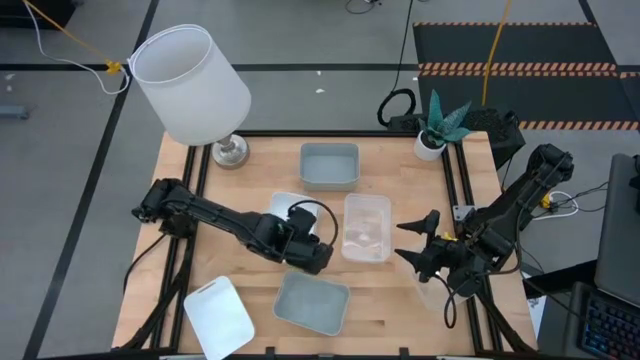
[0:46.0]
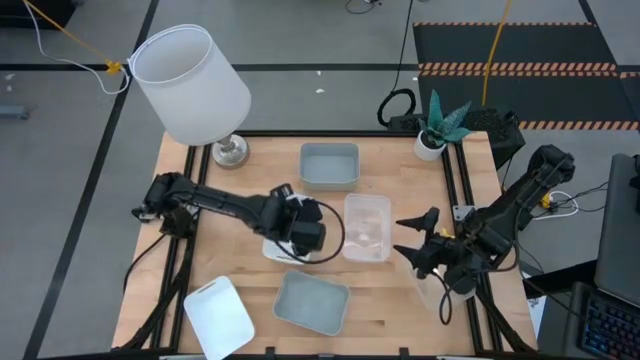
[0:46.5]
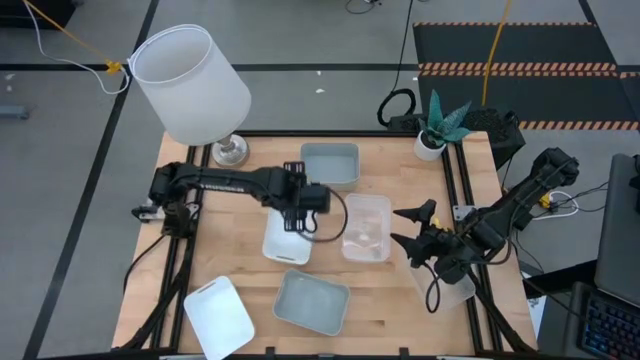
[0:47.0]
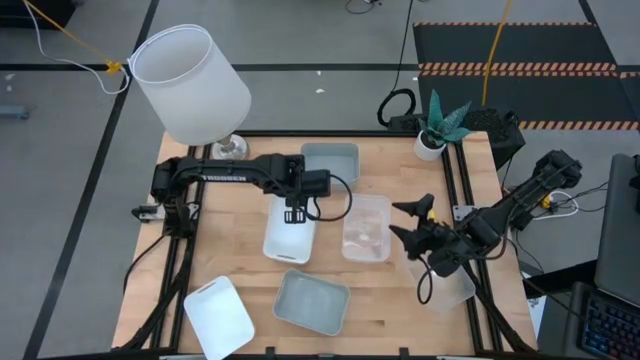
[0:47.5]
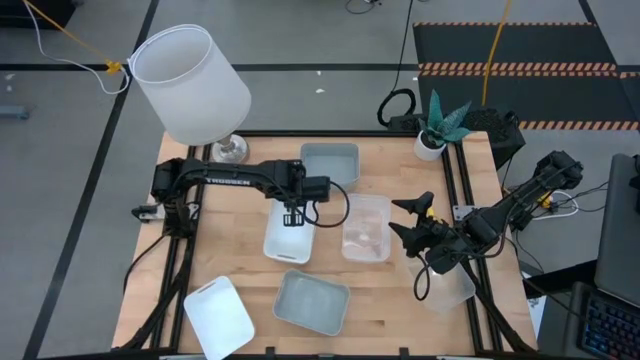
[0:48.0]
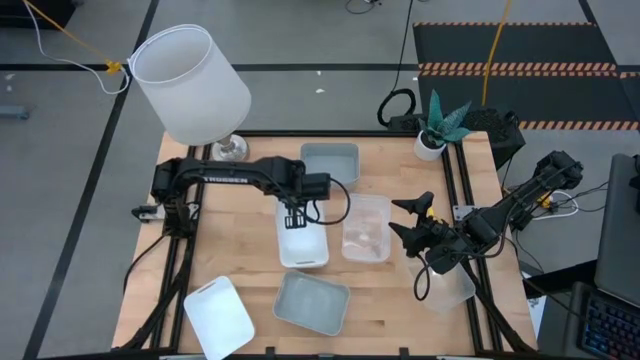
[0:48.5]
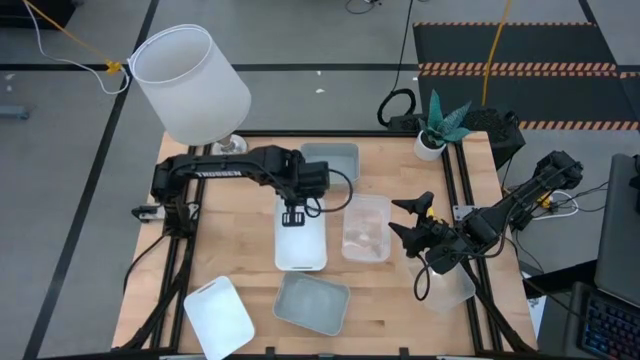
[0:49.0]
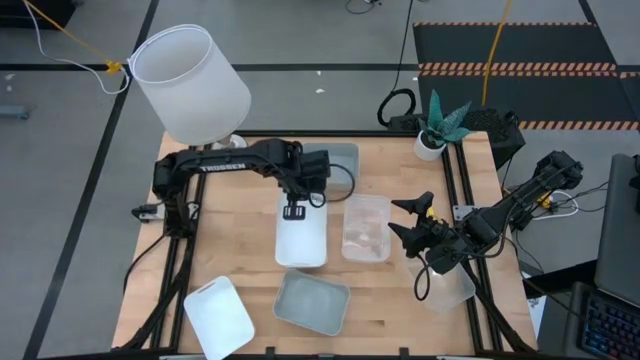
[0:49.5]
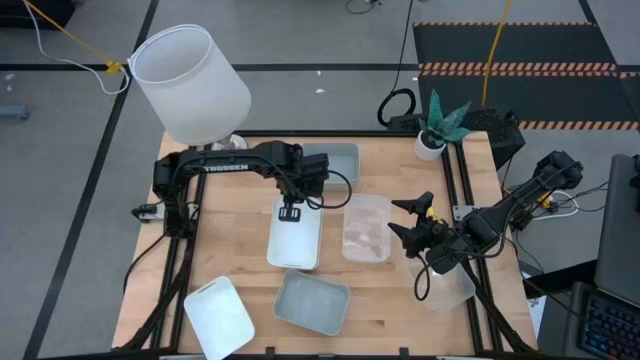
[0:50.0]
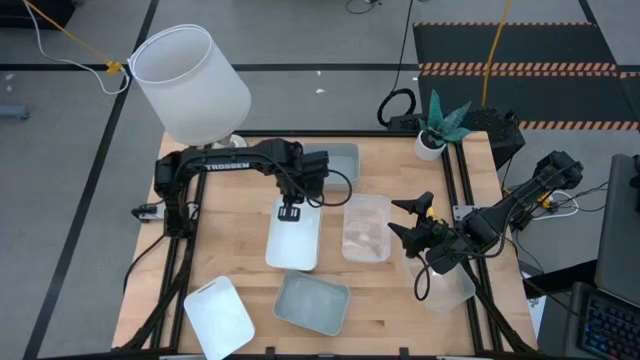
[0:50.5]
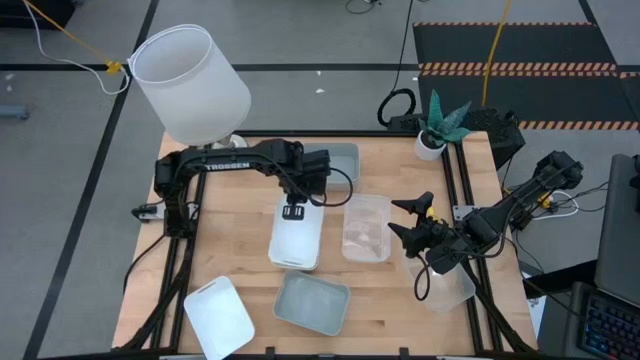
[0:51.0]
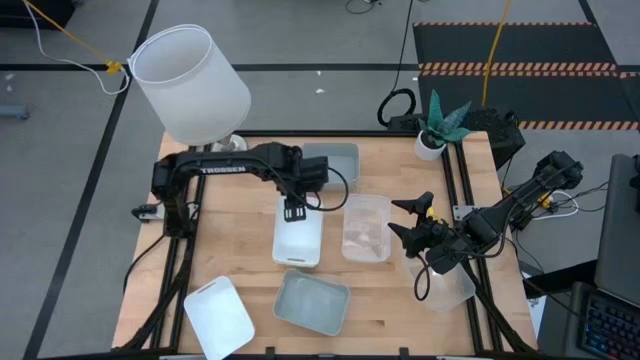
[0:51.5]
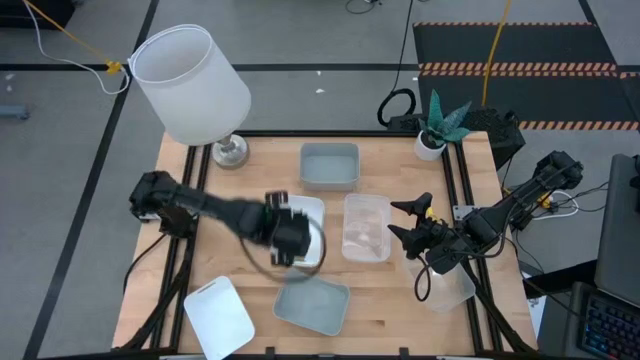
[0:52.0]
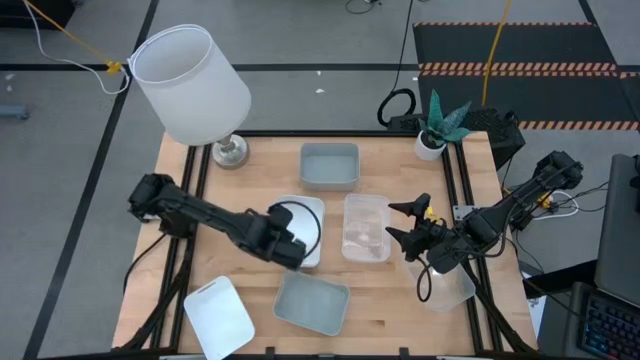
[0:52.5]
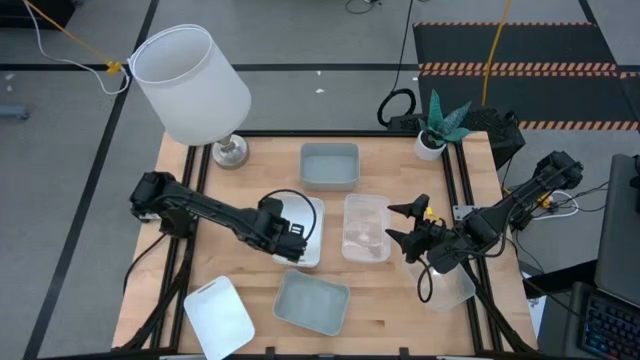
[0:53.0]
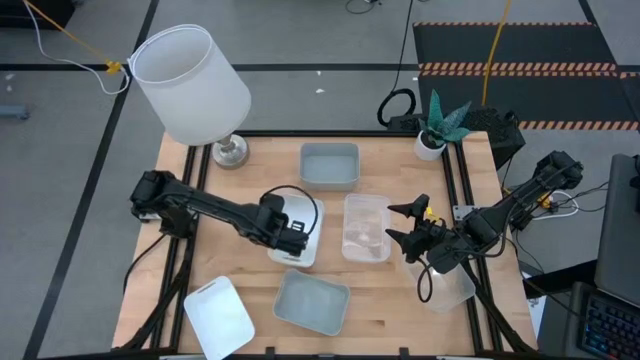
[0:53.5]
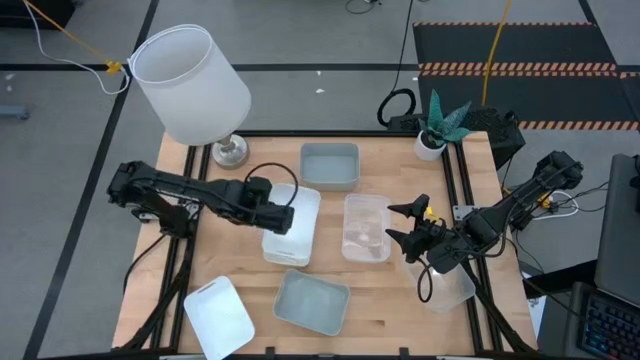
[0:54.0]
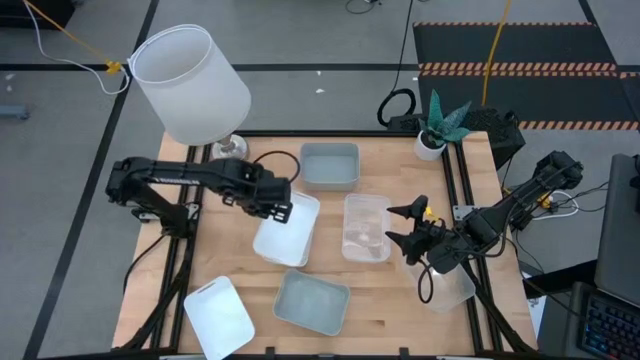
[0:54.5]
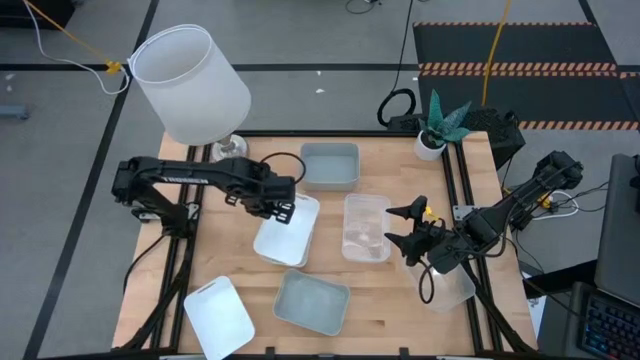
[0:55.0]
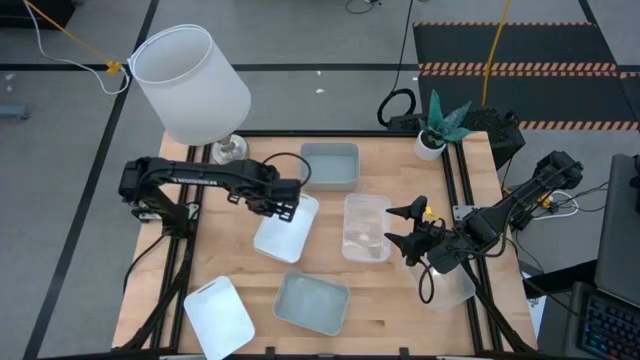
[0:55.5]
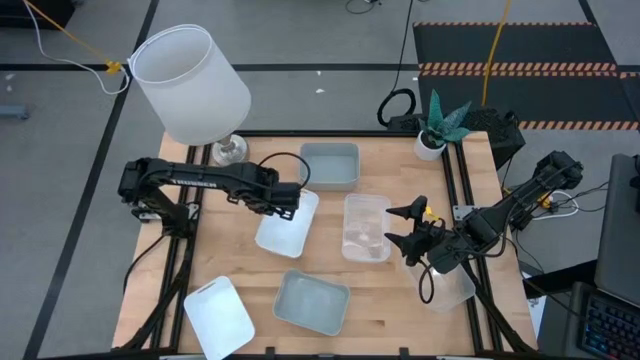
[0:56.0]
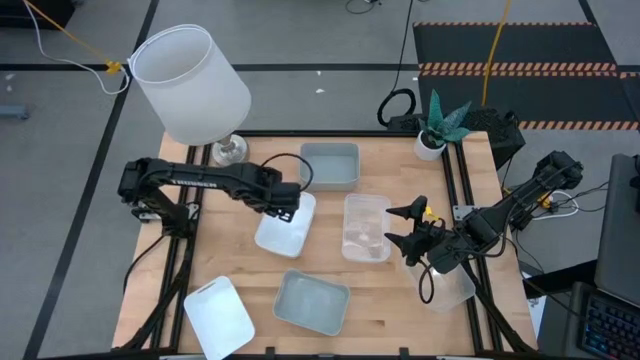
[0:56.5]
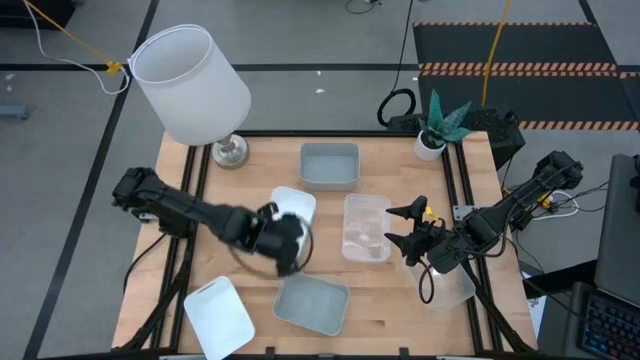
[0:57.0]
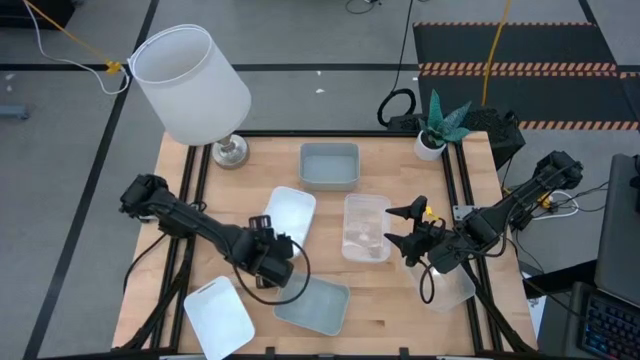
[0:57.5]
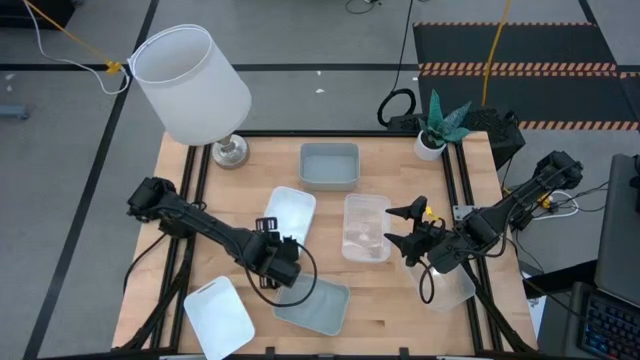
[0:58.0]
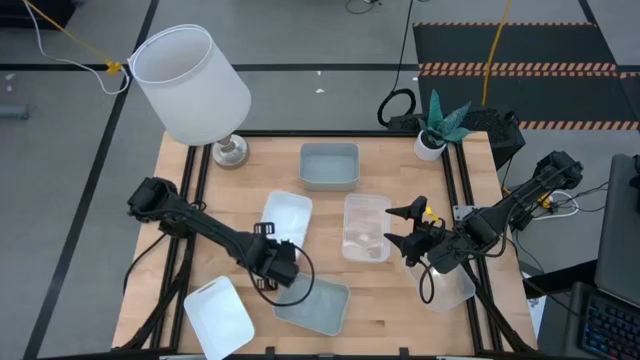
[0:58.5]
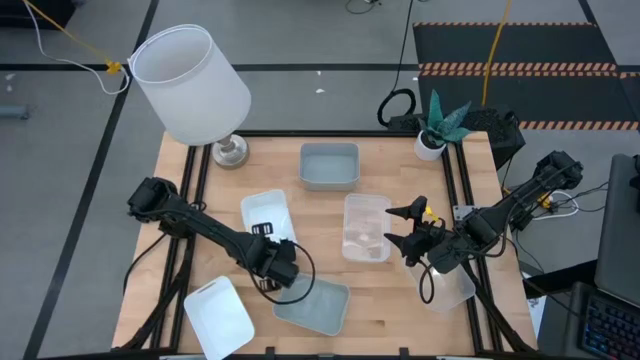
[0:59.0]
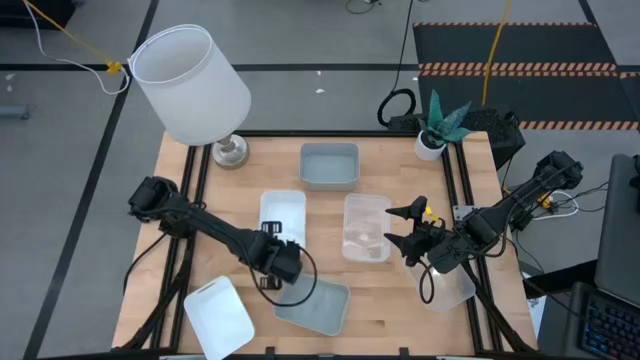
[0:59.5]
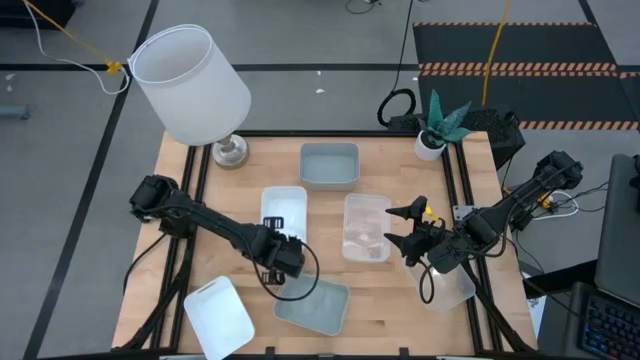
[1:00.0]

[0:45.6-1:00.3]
Stack the right white bin on top of the top white bin
